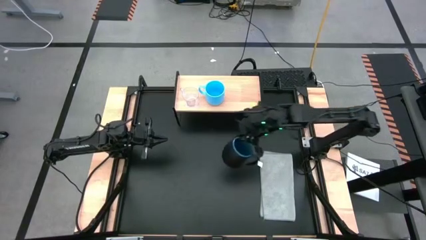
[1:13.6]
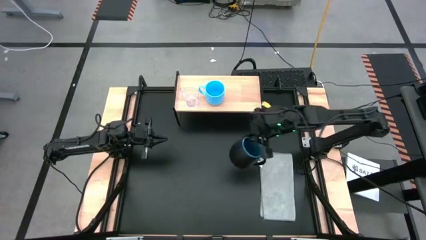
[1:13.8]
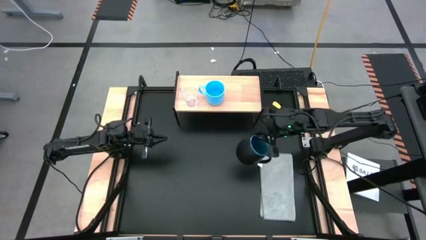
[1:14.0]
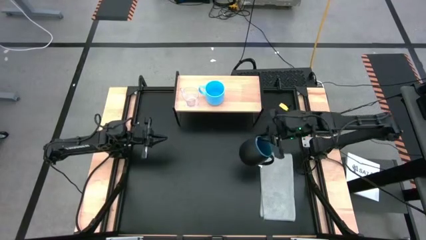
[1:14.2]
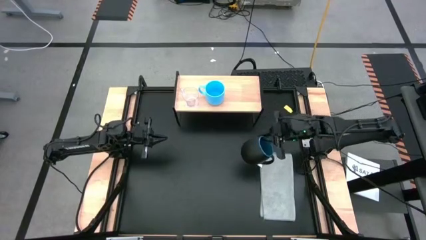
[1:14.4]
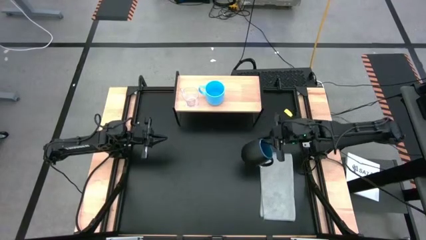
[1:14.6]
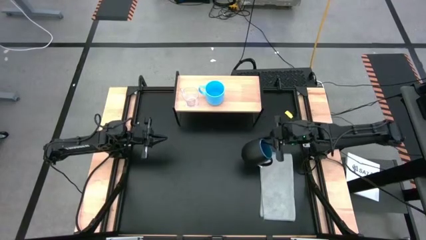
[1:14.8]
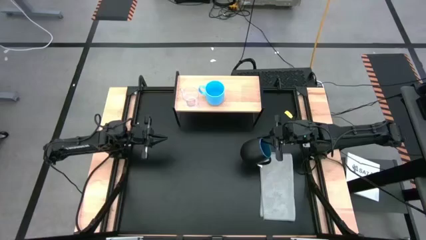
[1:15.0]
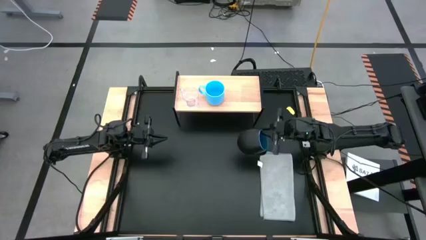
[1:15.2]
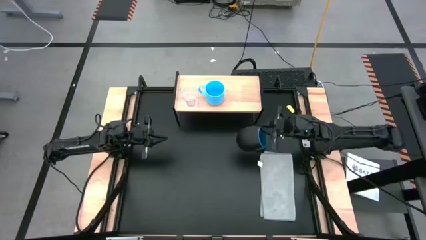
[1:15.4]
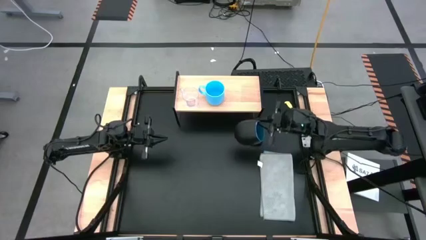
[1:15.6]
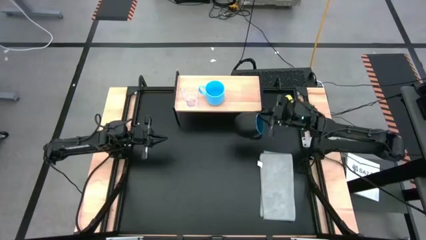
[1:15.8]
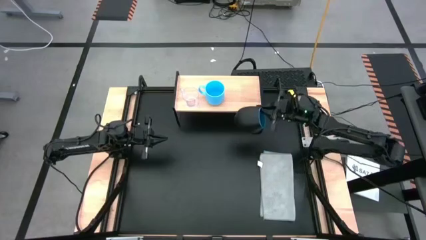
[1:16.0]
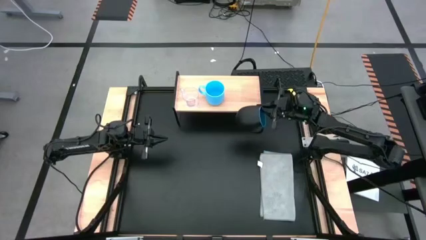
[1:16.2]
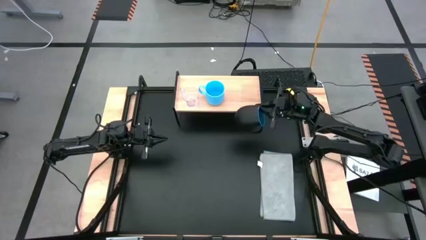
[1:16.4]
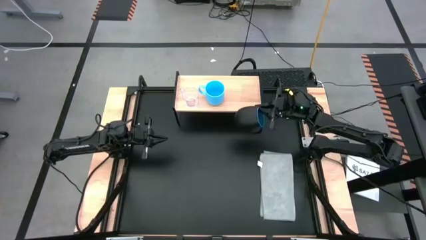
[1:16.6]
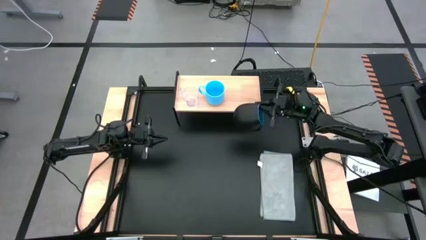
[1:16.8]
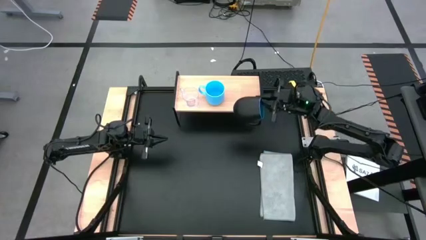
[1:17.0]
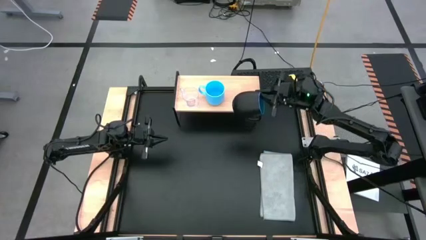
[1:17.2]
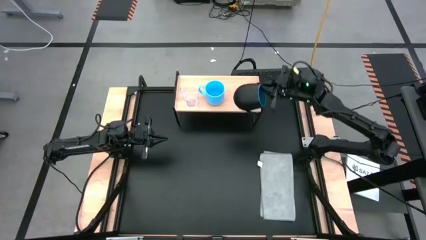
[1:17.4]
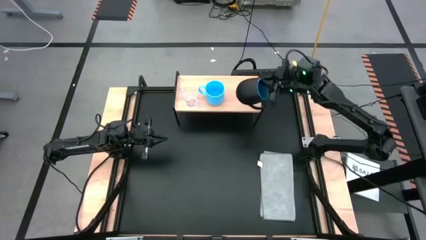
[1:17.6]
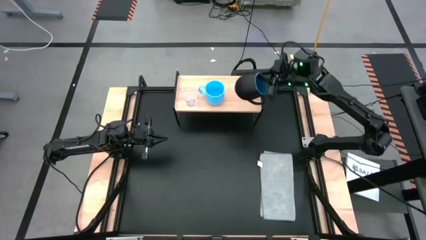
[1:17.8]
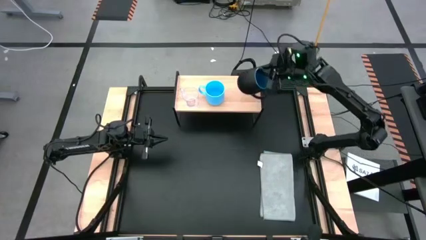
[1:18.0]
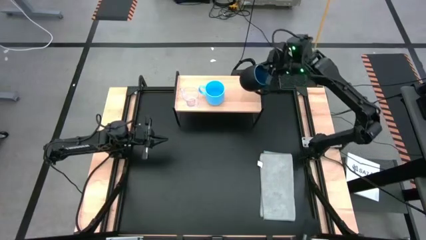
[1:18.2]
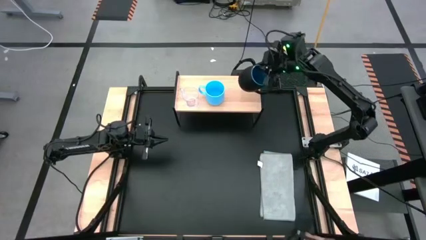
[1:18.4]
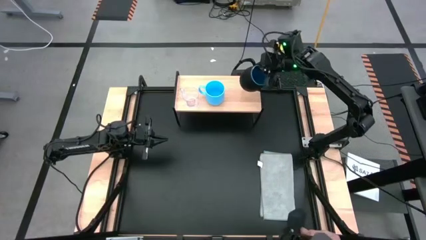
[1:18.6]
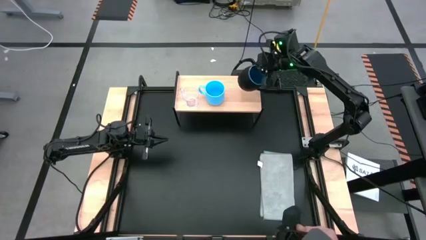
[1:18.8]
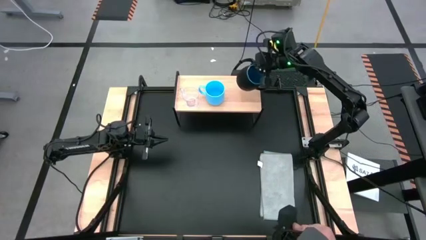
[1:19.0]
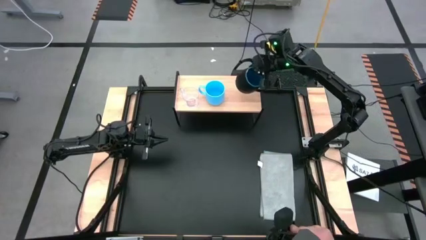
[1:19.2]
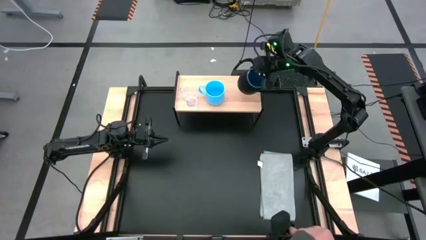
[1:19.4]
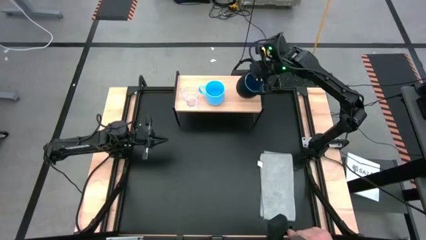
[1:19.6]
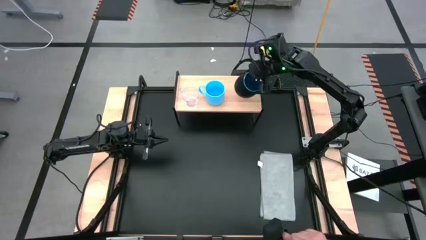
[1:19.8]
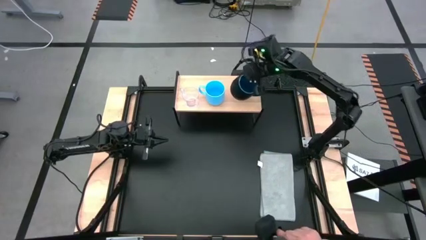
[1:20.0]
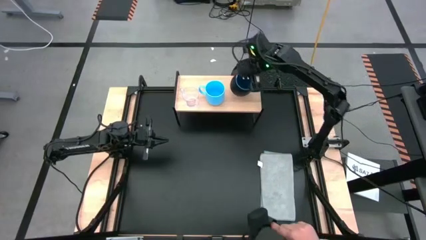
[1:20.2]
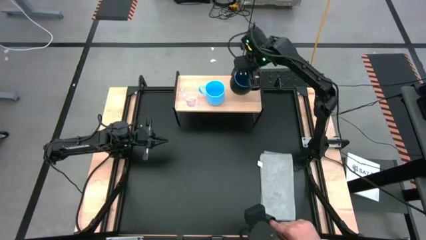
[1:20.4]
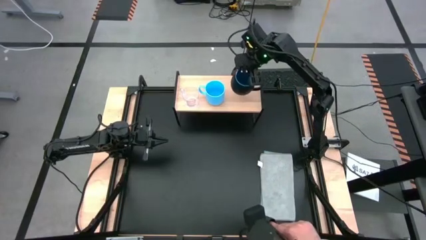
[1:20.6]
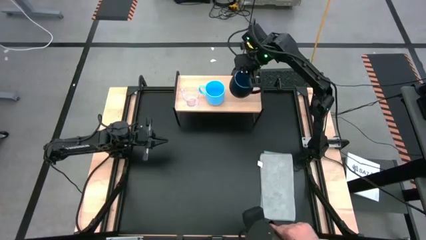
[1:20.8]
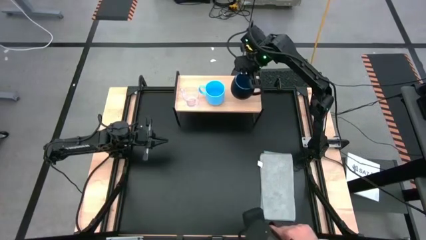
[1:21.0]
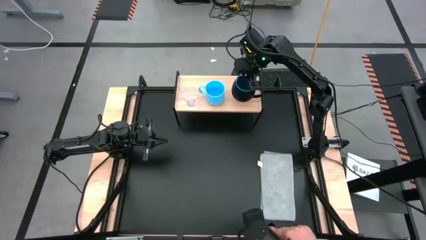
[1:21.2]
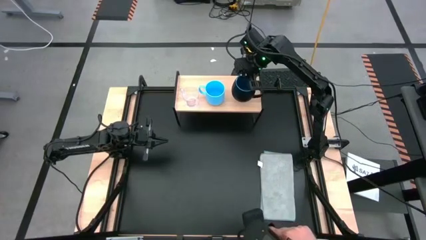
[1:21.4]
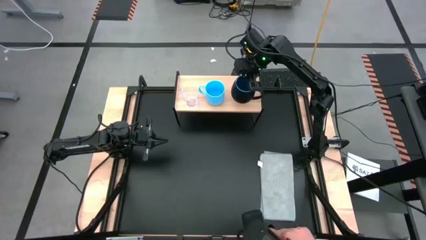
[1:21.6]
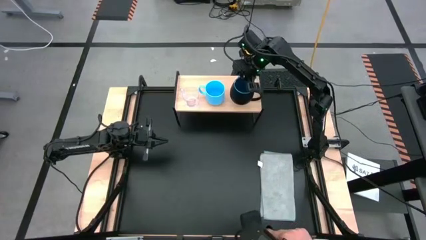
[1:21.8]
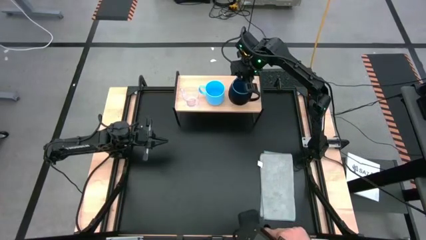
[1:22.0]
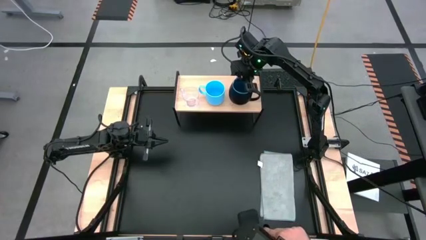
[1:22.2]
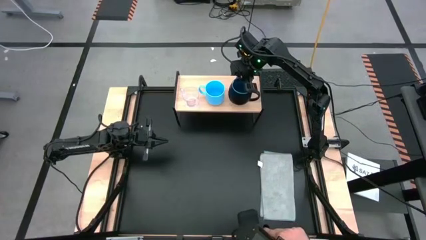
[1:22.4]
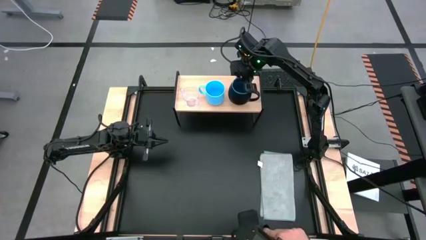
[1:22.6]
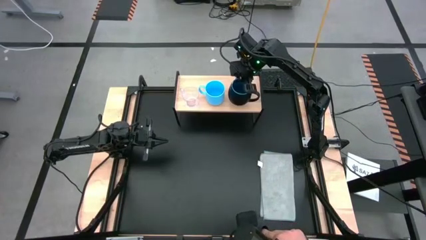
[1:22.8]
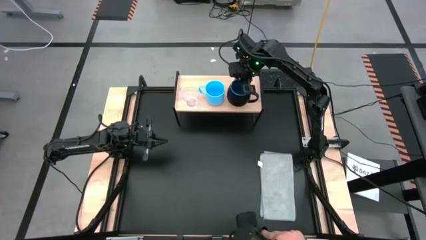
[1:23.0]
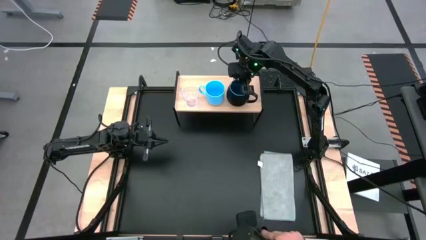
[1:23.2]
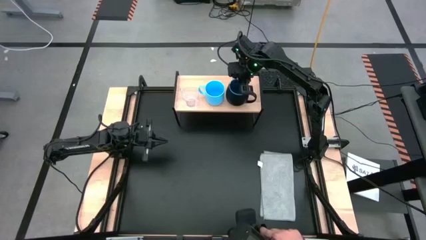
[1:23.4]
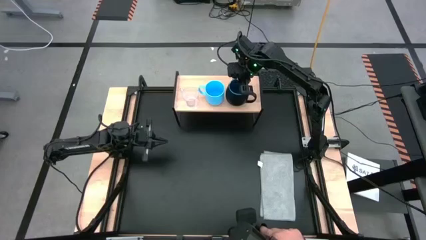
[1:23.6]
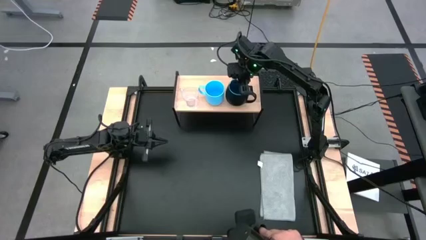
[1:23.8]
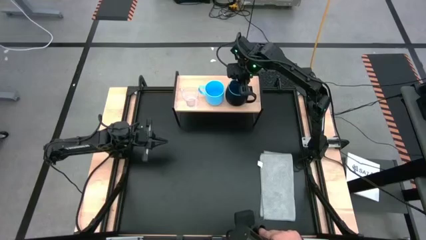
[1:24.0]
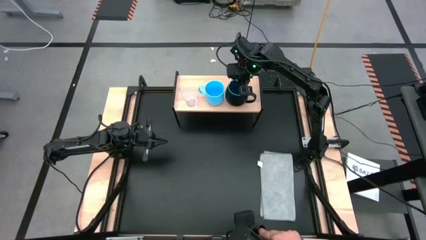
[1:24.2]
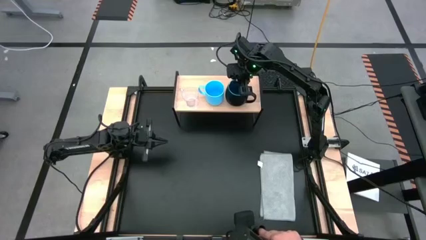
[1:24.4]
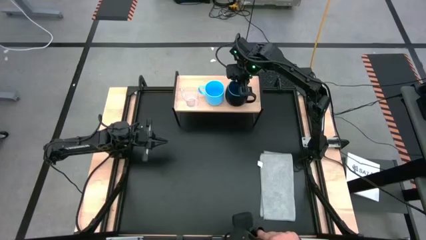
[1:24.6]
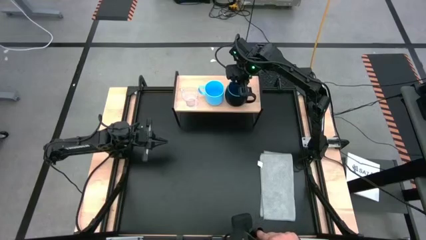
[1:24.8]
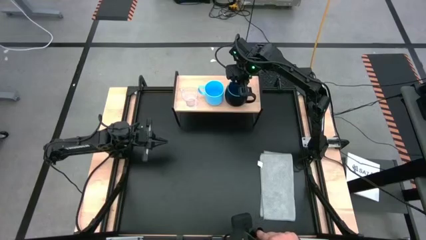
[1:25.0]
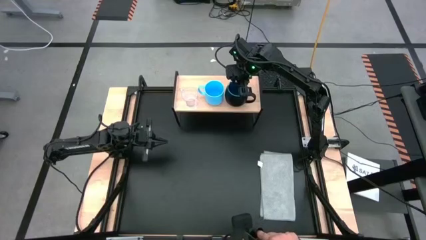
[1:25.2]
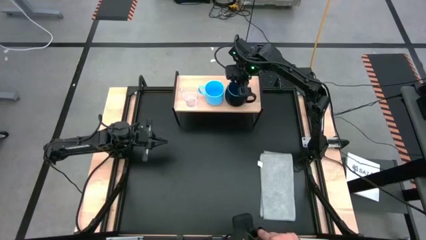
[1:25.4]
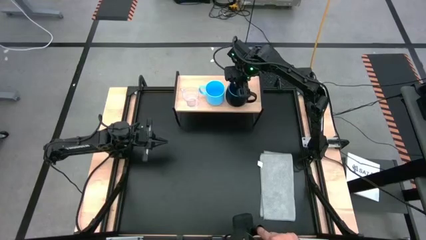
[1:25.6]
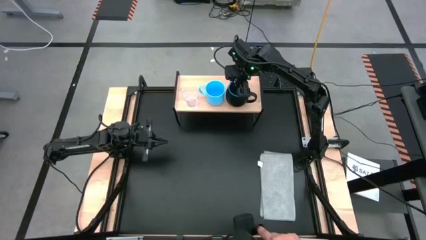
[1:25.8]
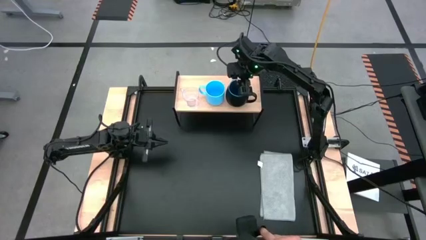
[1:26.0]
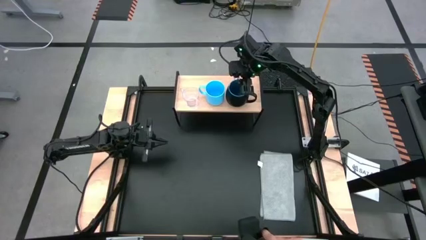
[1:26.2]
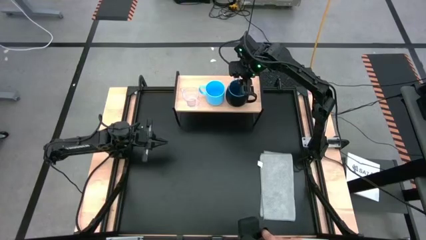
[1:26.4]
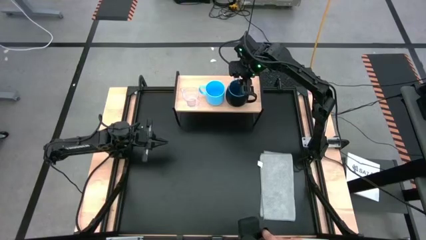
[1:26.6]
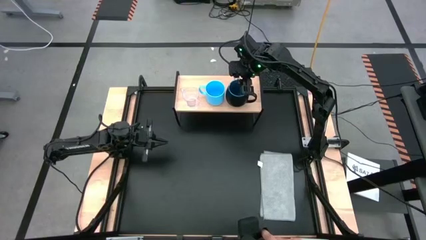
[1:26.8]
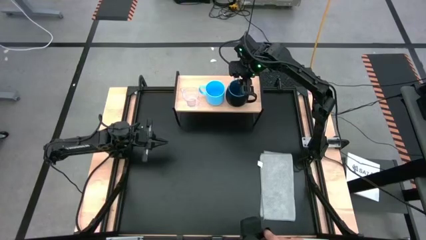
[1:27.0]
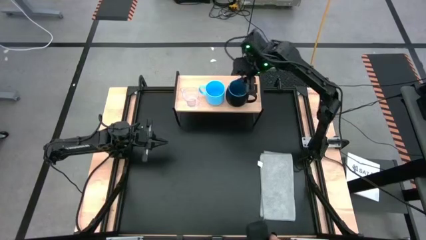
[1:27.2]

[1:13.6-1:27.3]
Task: Stack small to large cups/mugs on shelf
Put the black mug on the shelf
